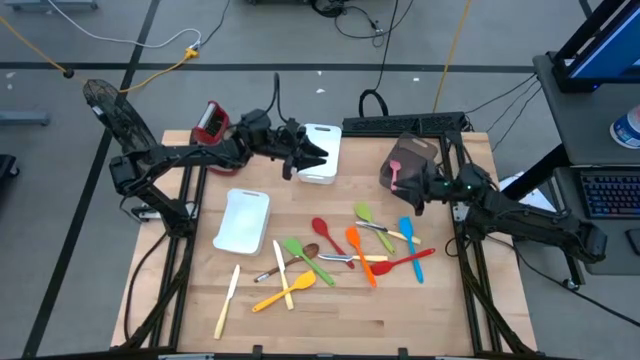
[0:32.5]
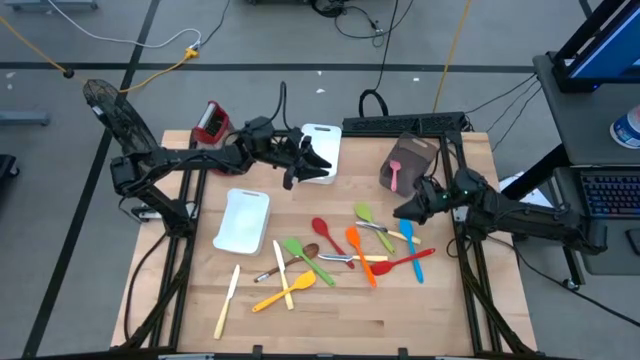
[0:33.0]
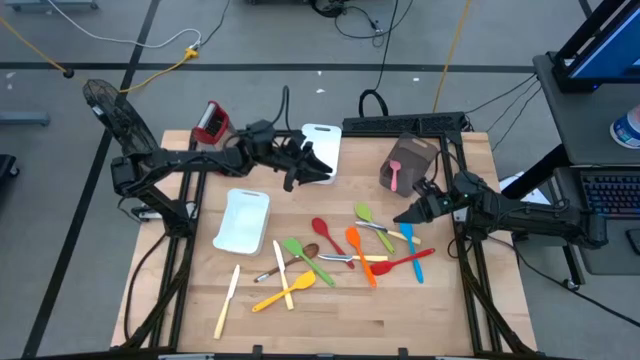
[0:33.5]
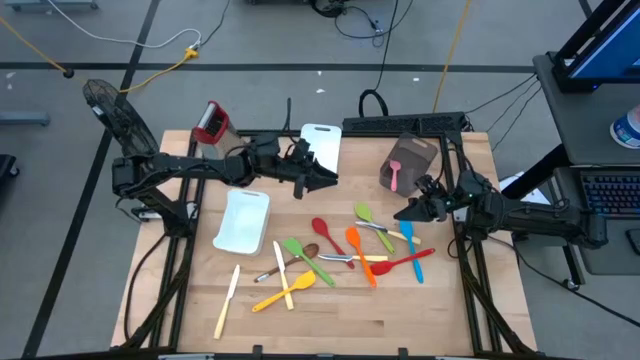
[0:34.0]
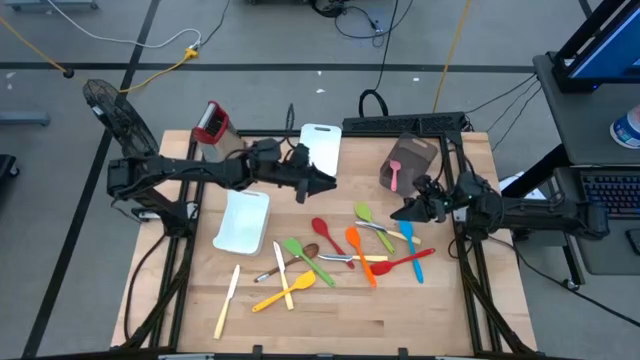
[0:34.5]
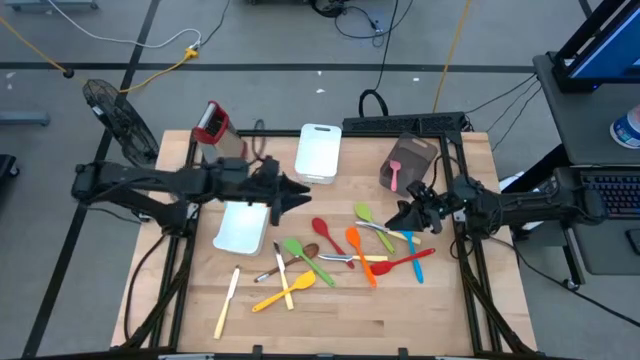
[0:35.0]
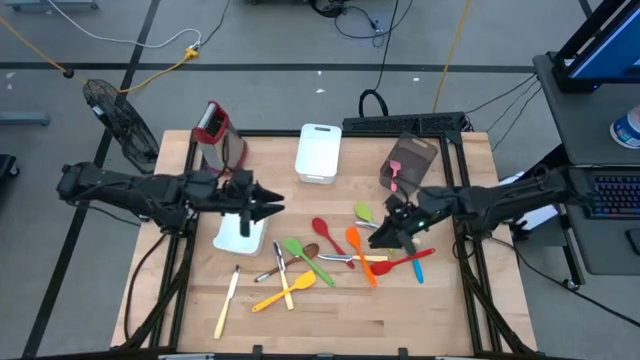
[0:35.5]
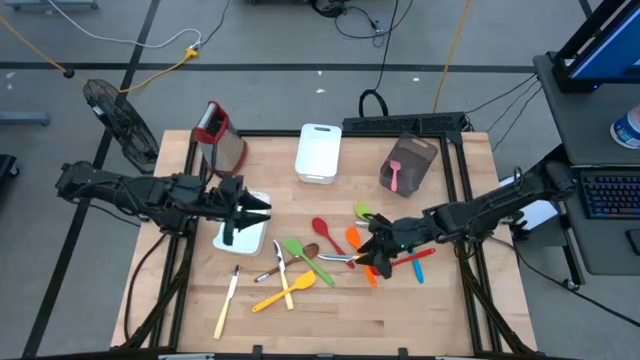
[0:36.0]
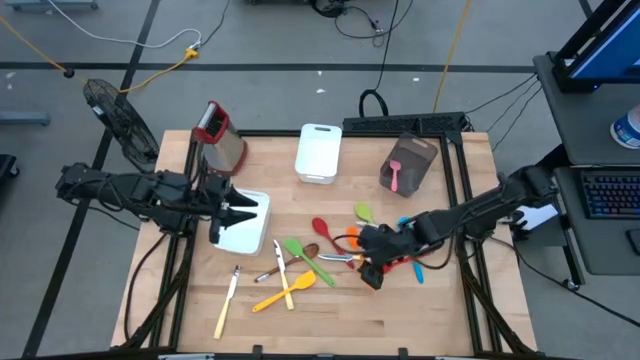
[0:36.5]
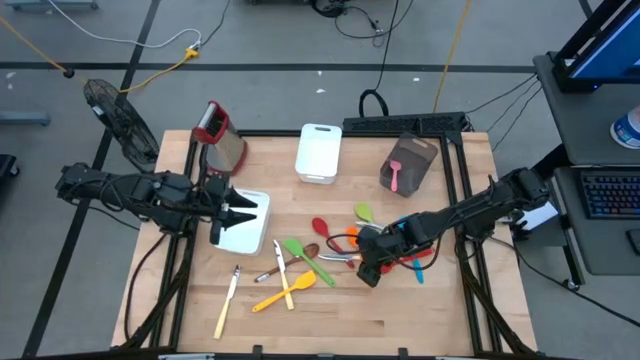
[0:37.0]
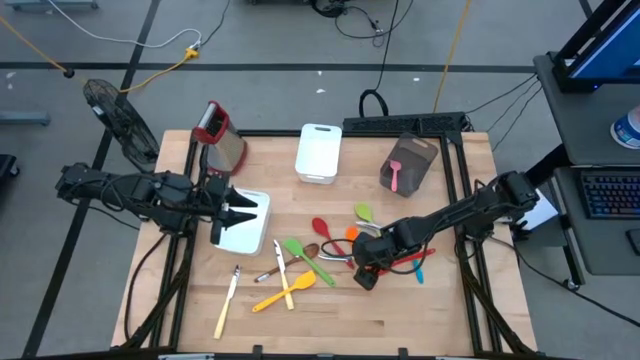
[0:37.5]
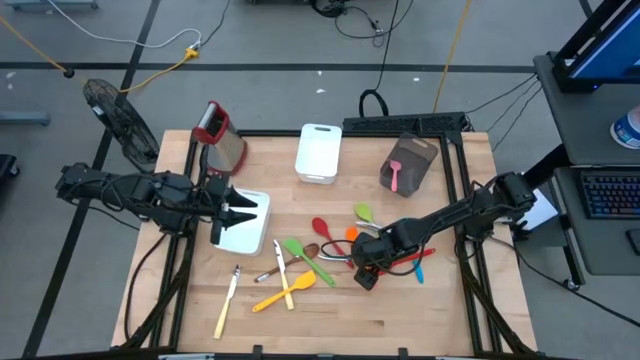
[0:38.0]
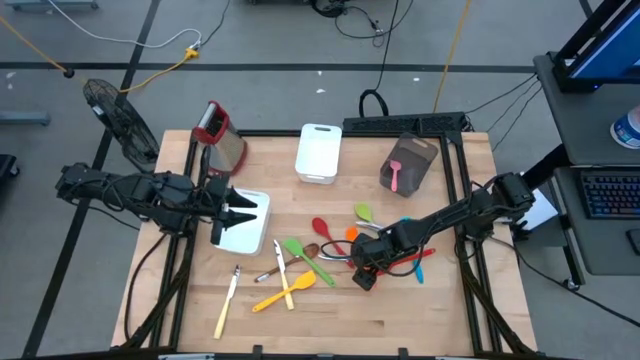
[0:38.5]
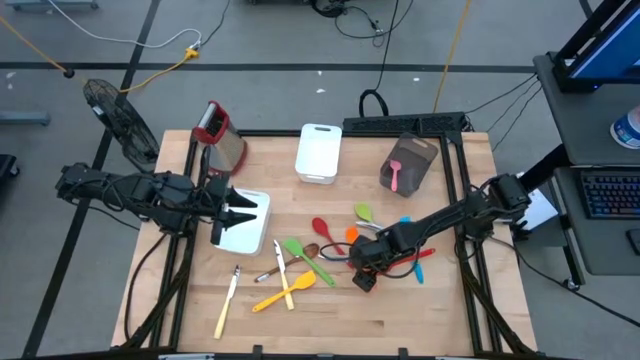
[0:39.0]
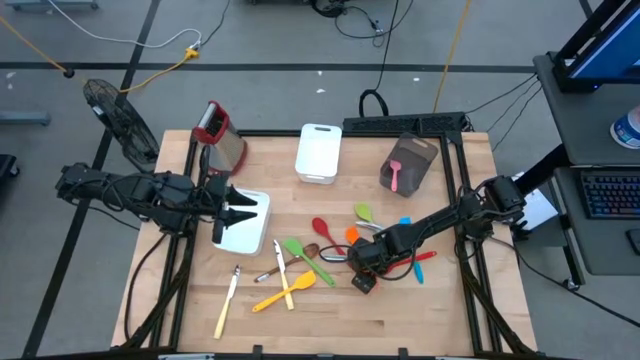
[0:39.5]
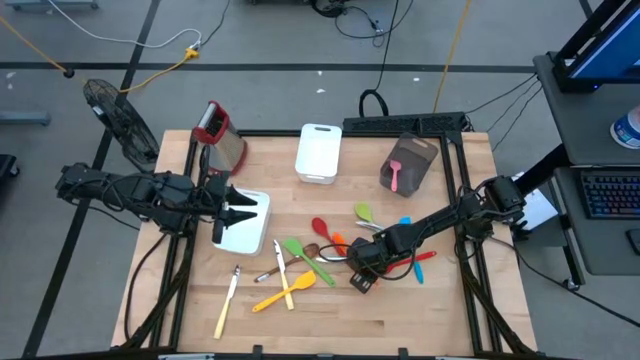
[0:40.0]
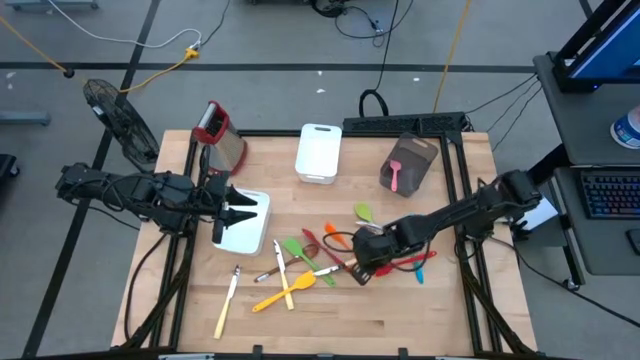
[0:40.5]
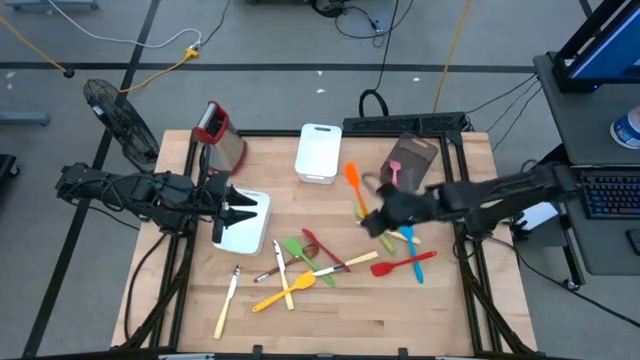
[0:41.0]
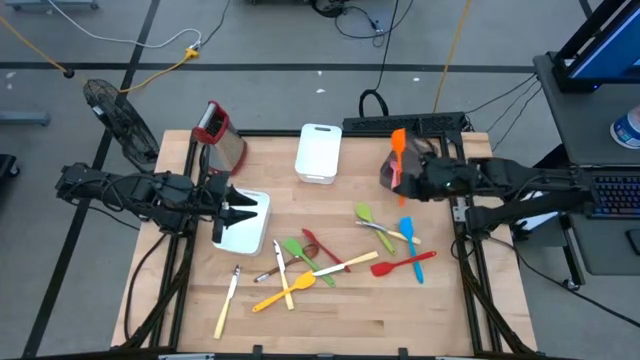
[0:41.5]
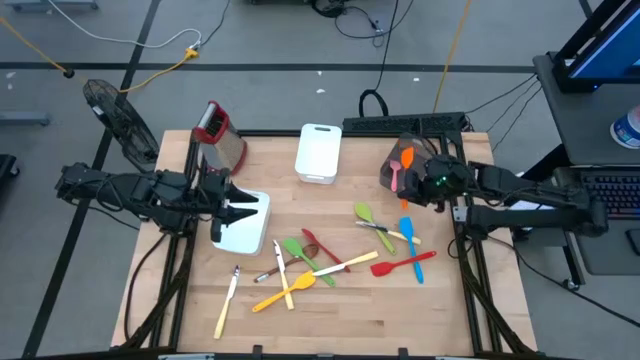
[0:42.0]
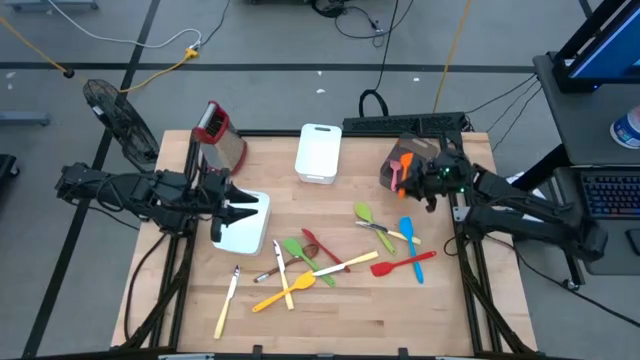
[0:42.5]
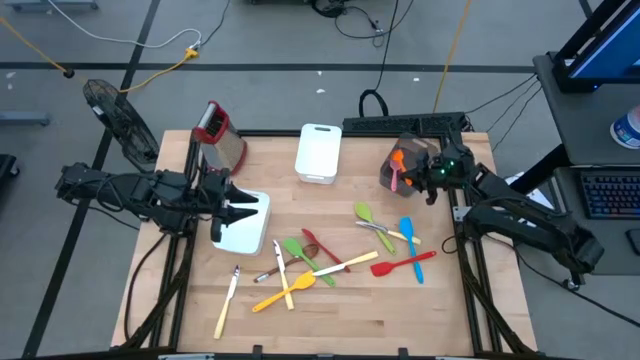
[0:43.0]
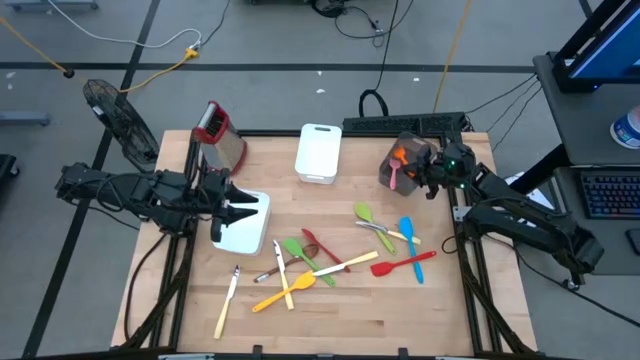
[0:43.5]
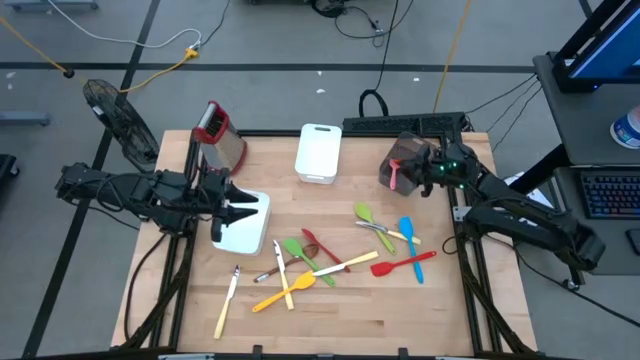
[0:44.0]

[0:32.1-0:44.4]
Task: Pick & Place Kitchen Items
Put the orange spatula into the black bin

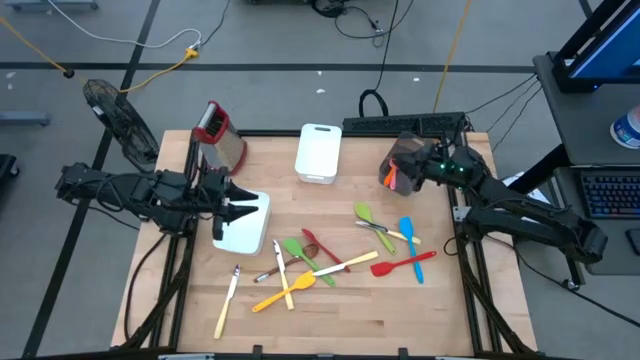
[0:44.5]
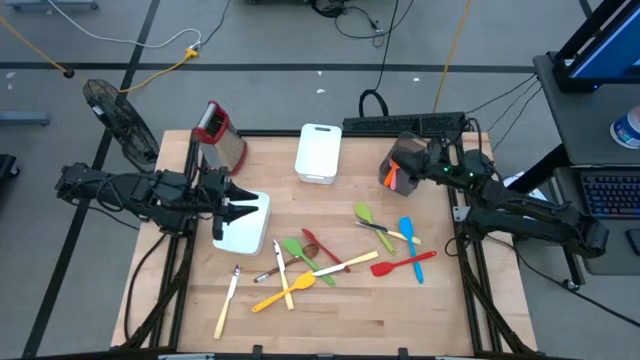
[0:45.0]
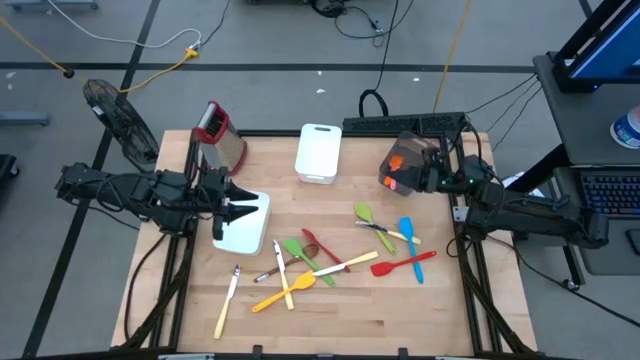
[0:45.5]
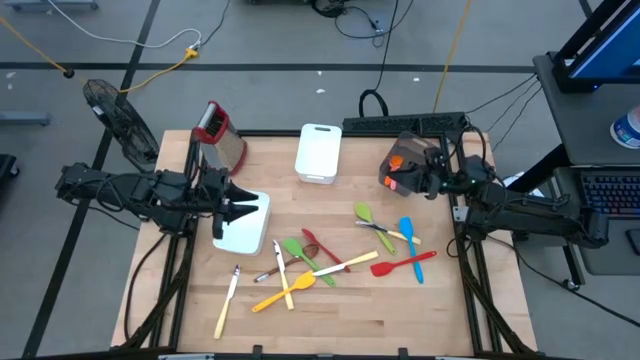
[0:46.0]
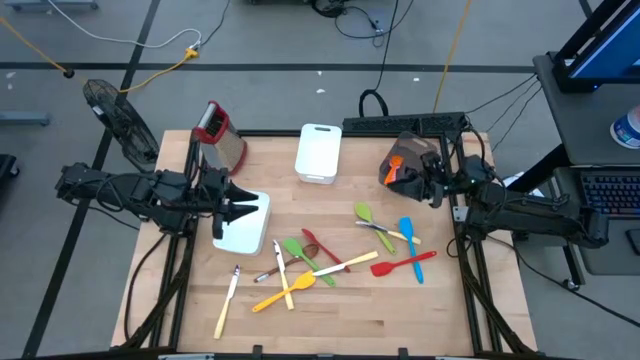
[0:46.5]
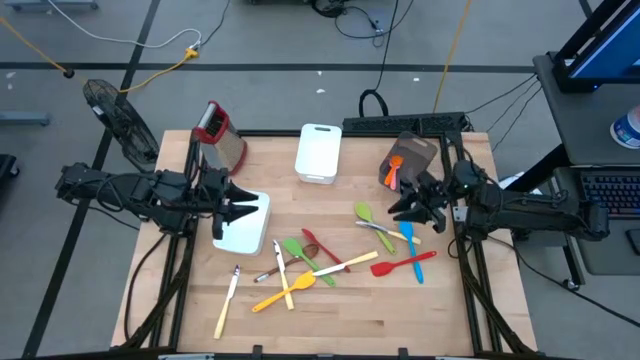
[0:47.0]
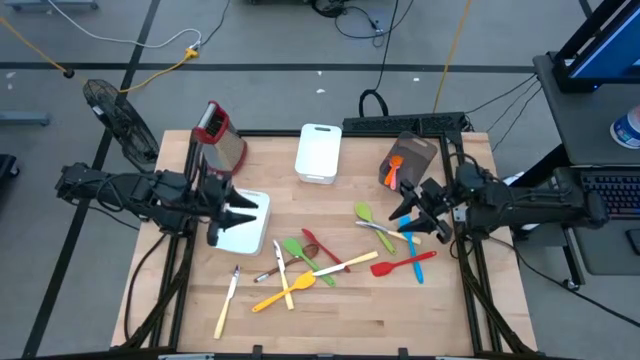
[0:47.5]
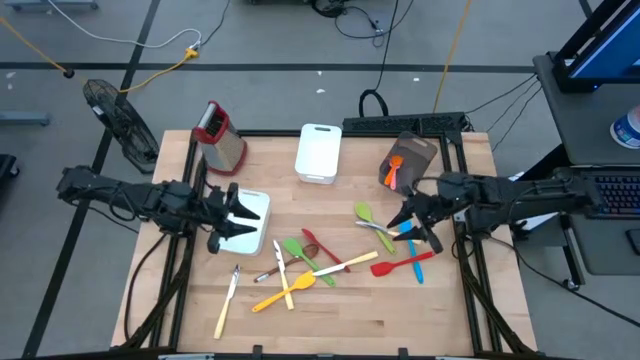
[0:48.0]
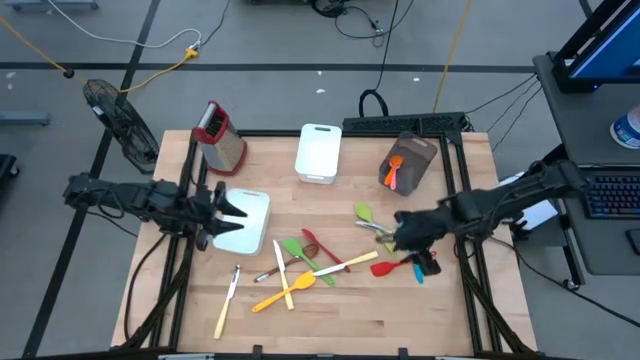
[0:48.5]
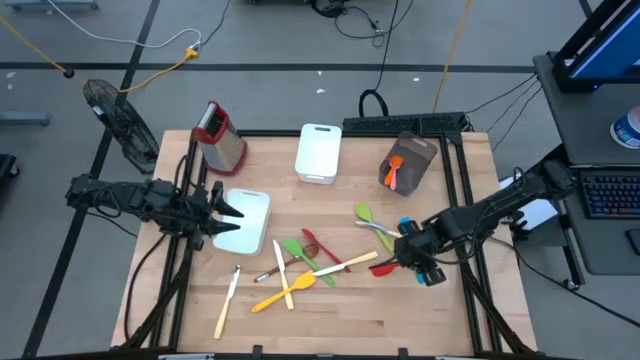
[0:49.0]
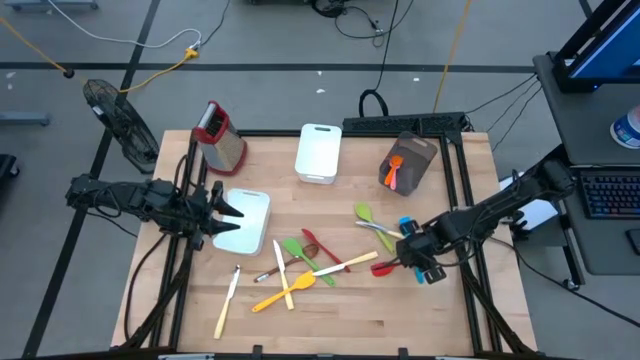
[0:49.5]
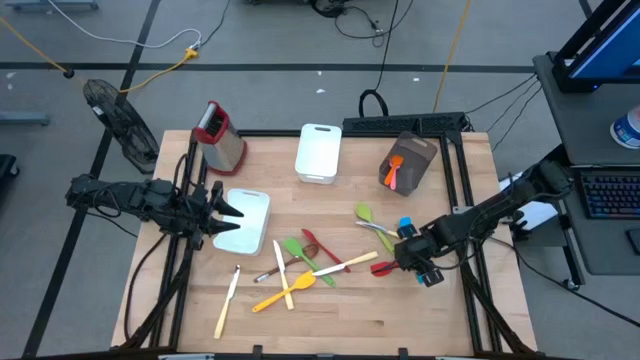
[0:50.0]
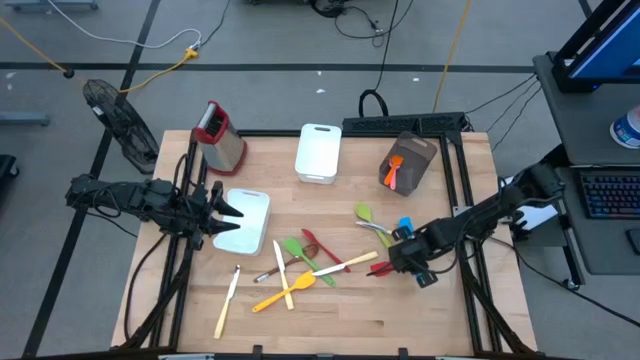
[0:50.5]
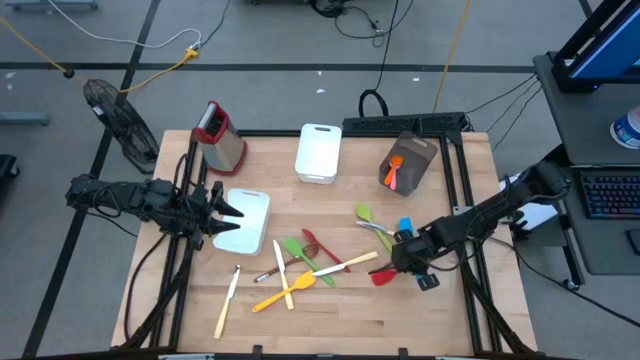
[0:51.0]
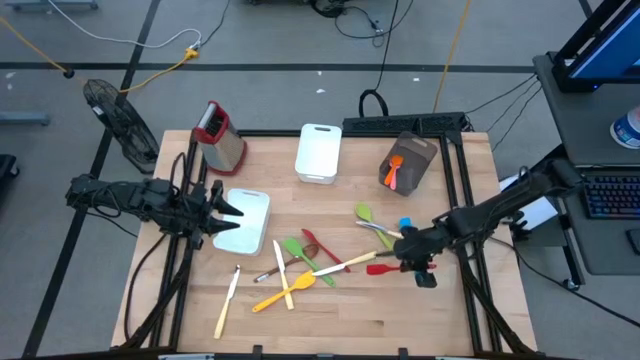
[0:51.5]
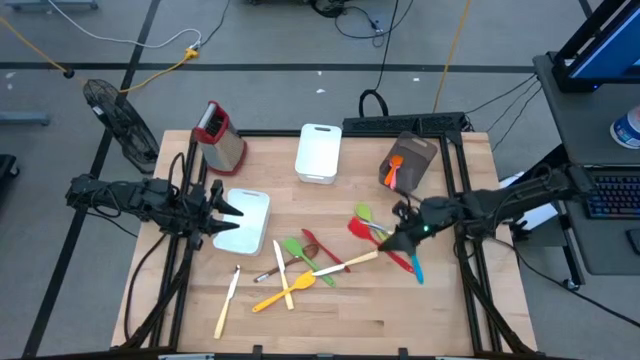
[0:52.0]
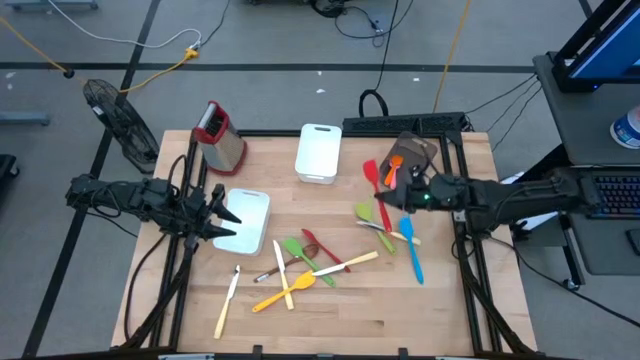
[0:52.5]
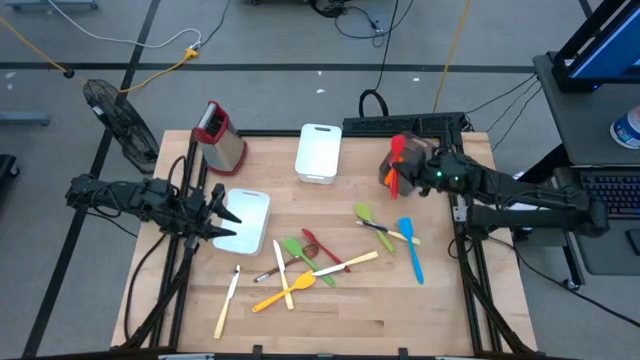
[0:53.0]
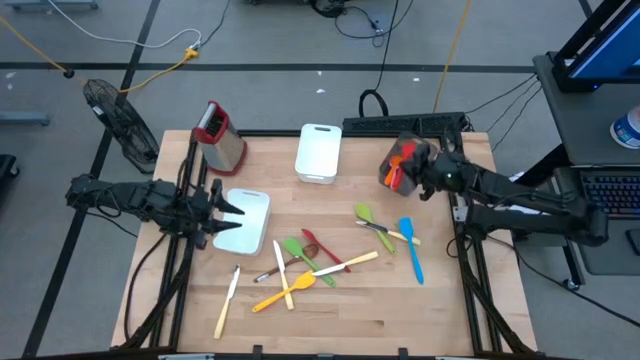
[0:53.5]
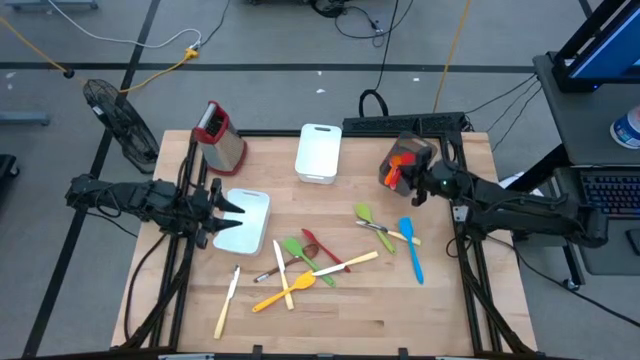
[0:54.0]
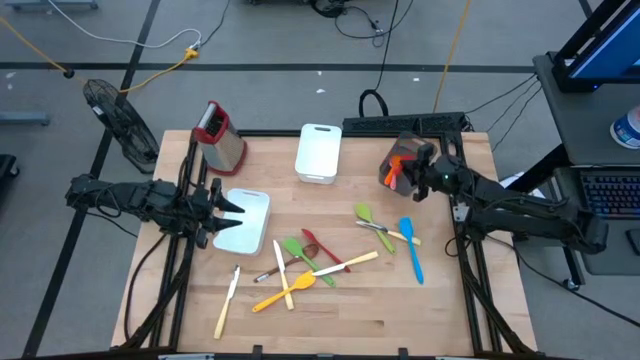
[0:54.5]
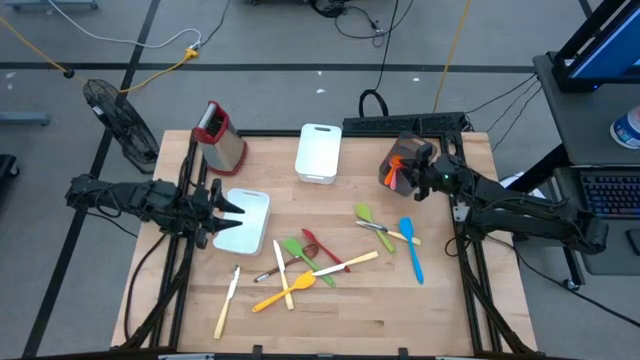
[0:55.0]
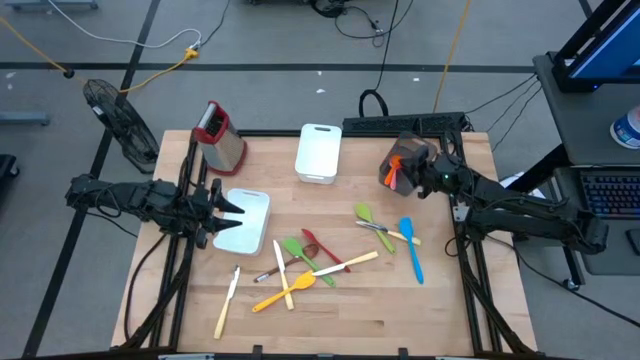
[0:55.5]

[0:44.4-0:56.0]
Put the red spatula into the black bin
